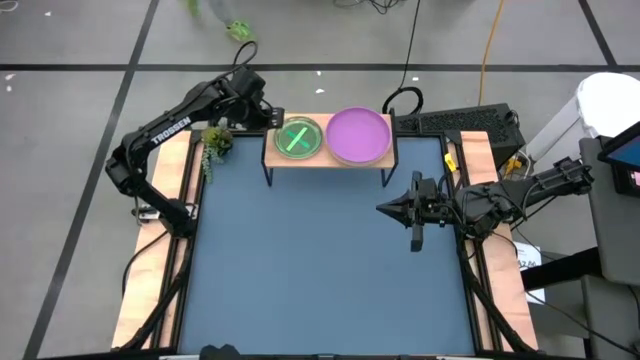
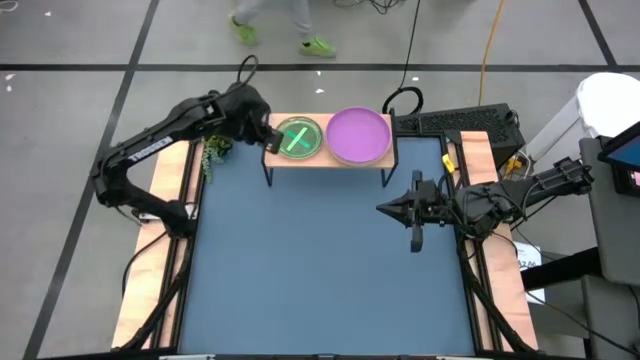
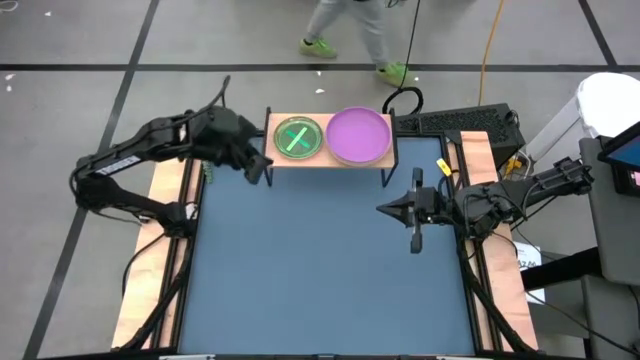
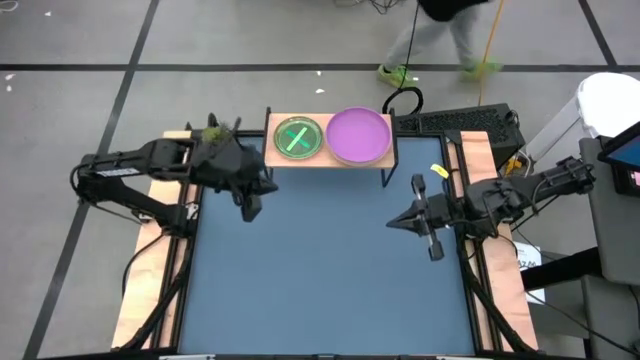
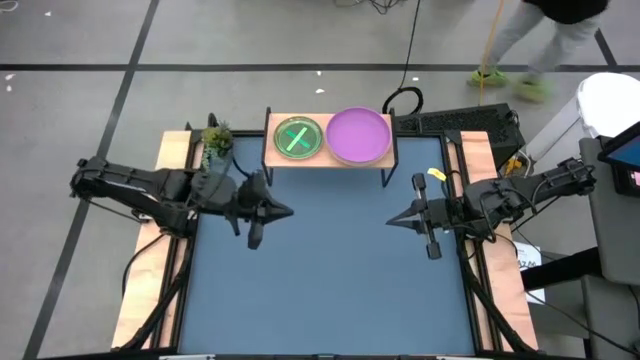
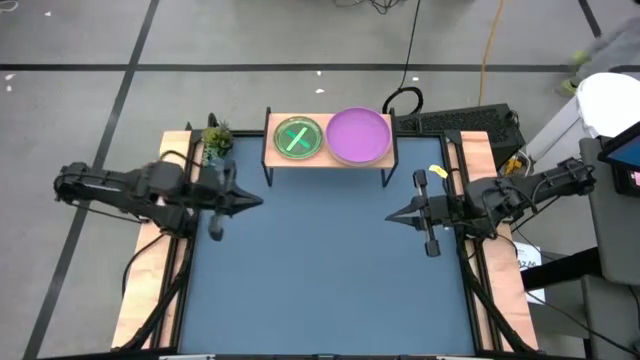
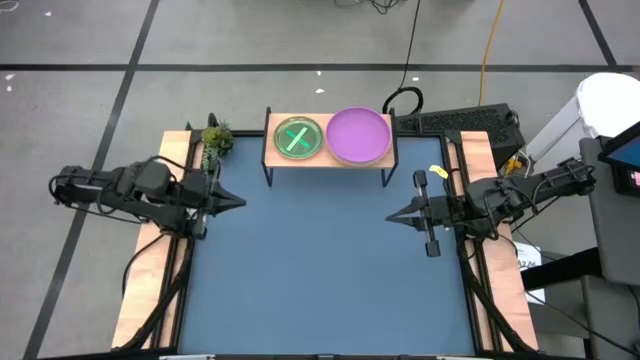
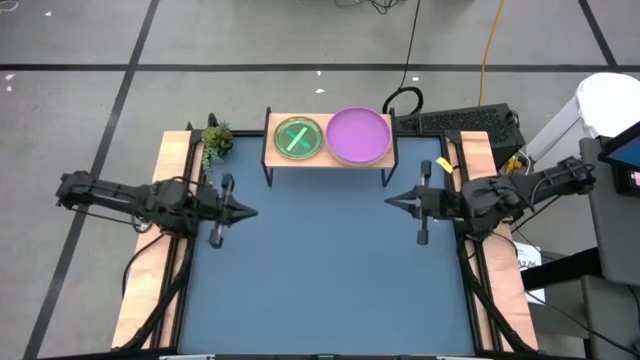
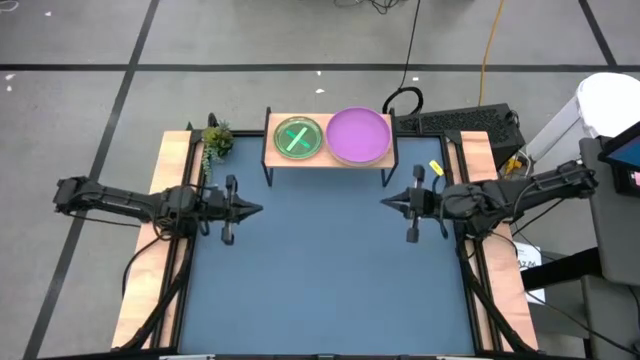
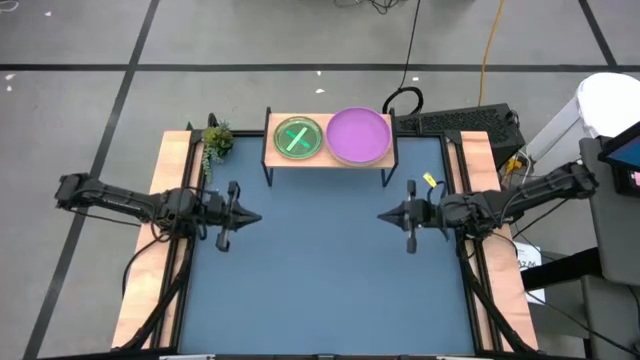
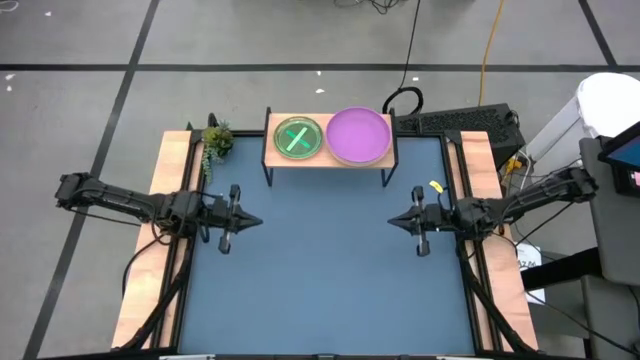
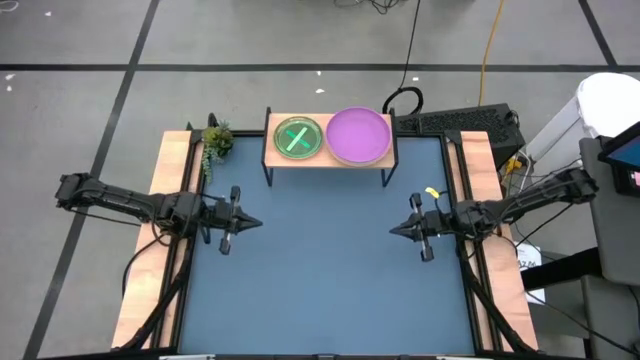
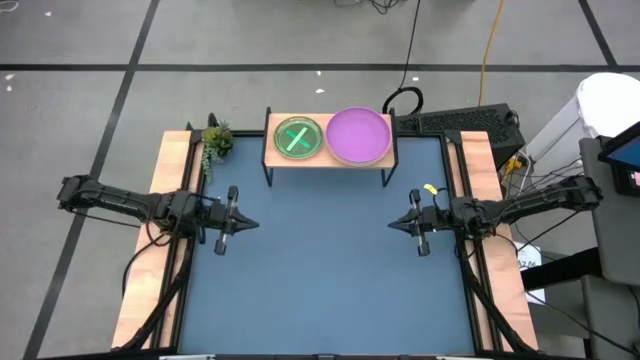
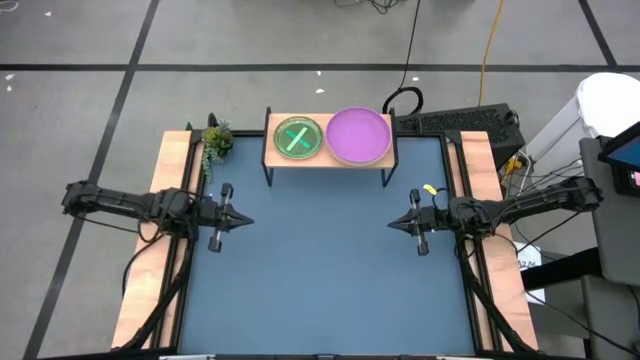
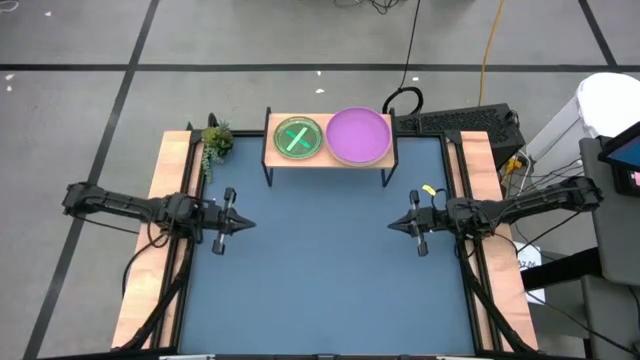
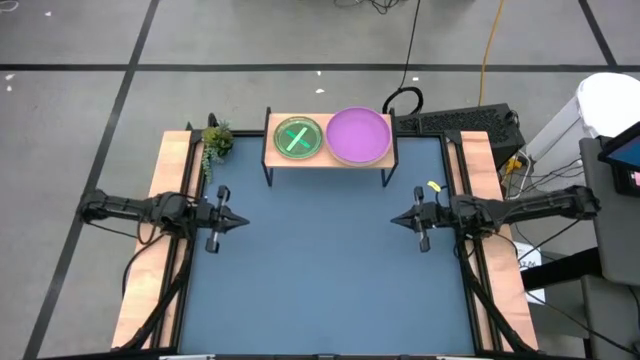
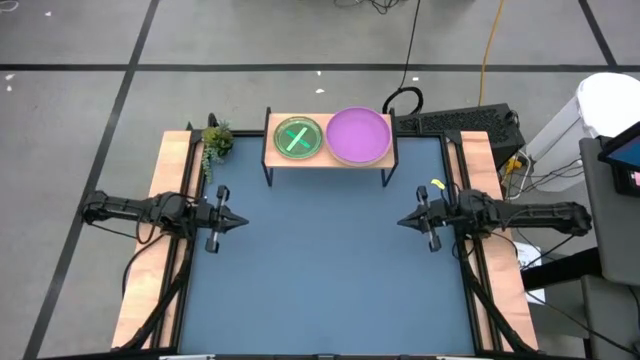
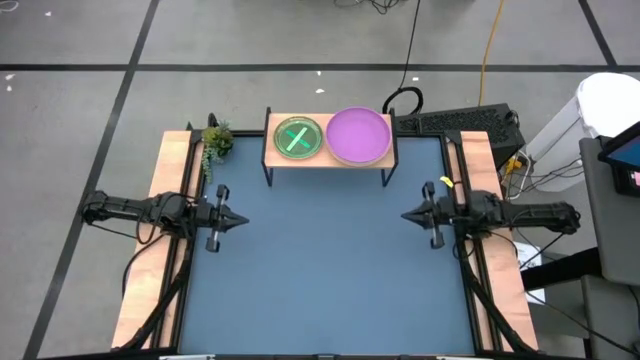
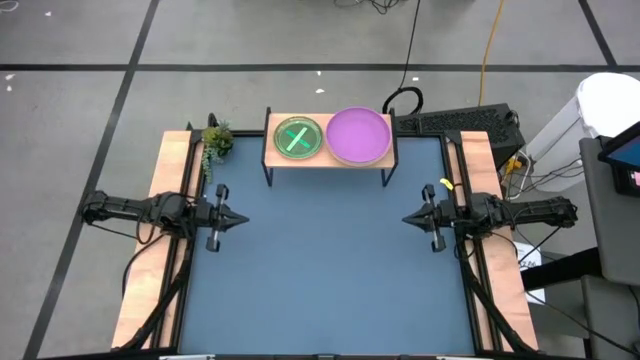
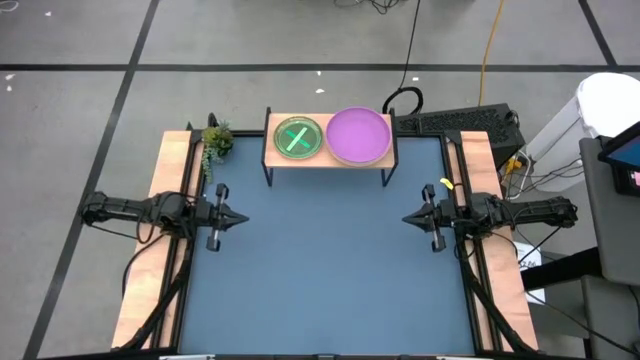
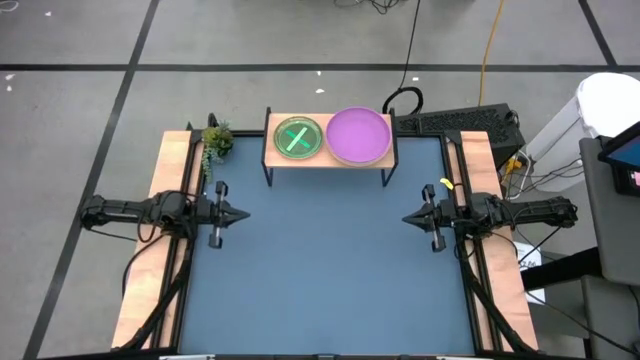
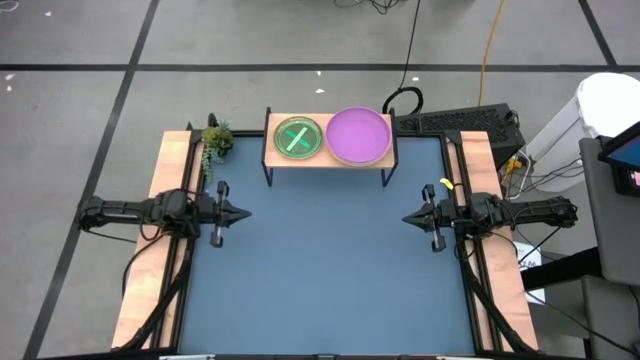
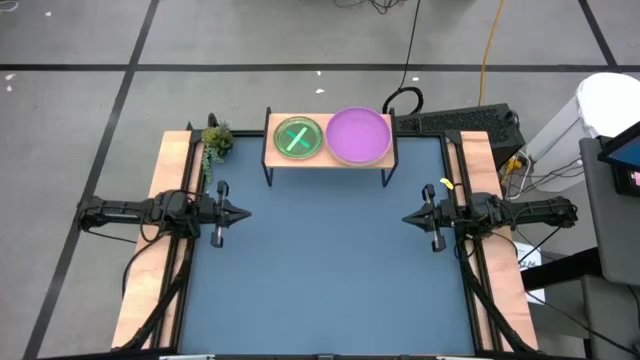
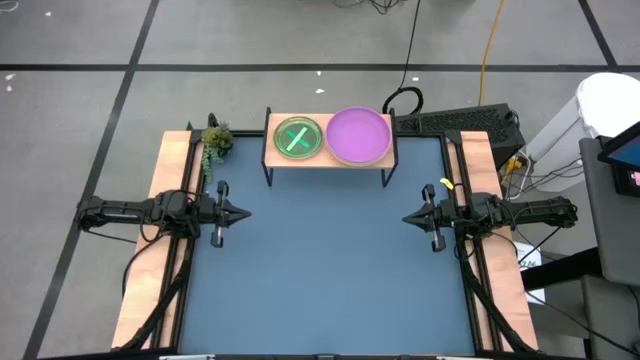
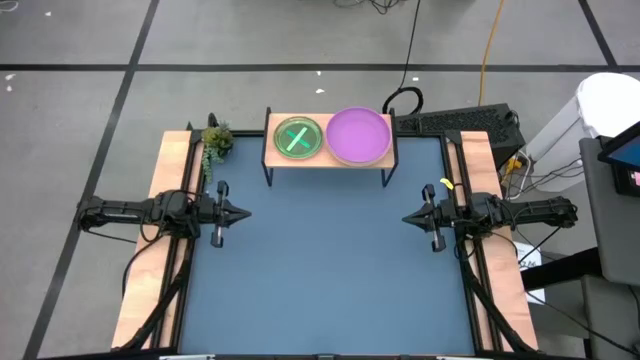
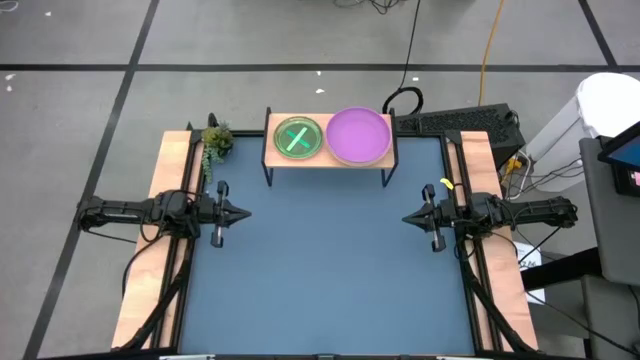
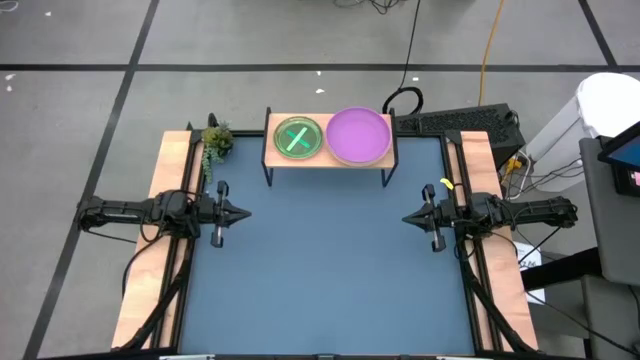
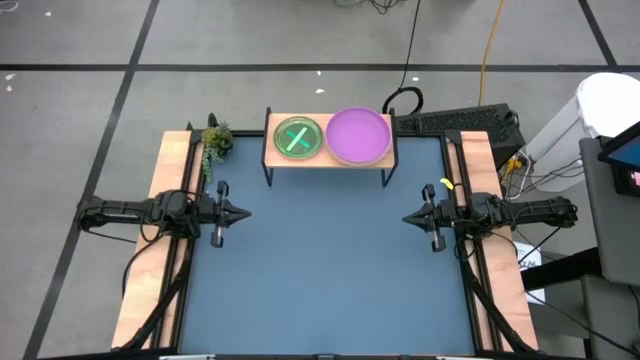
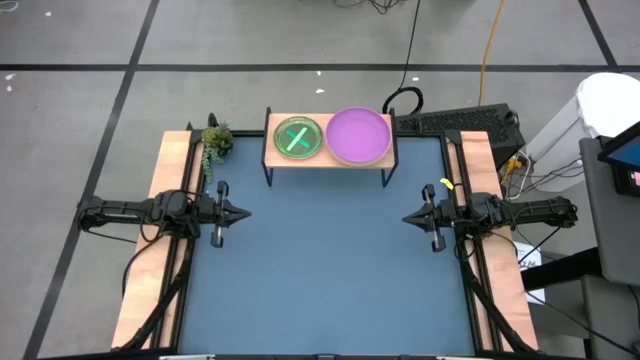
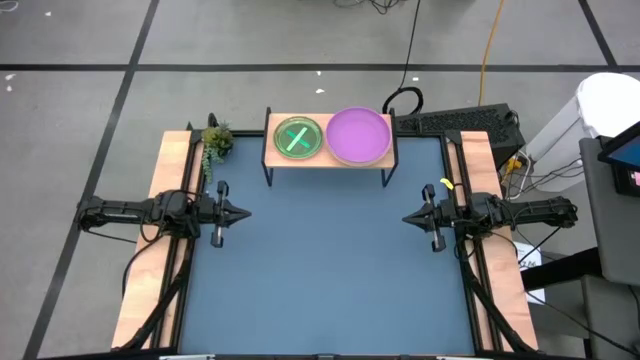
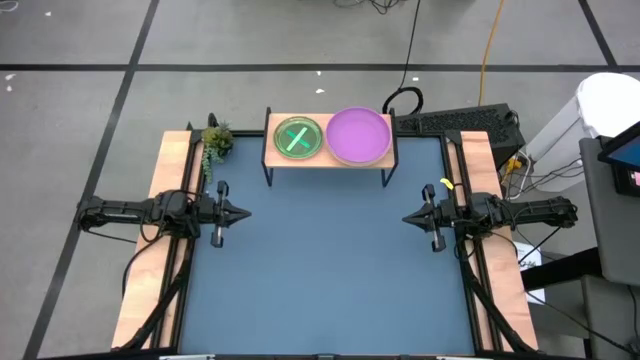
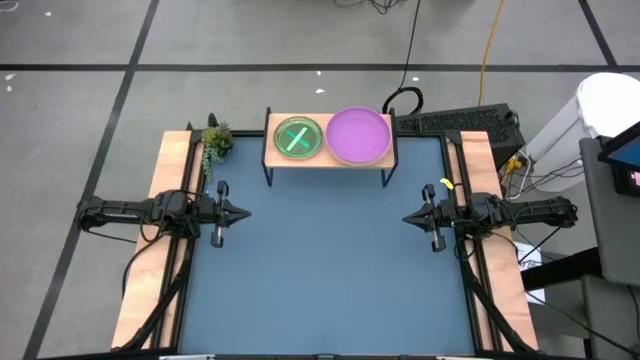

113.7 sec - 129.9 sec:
Task: Place and stack plates onto a shelf
Return to Home Position

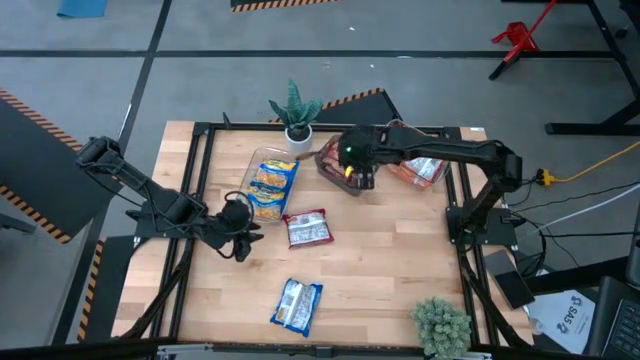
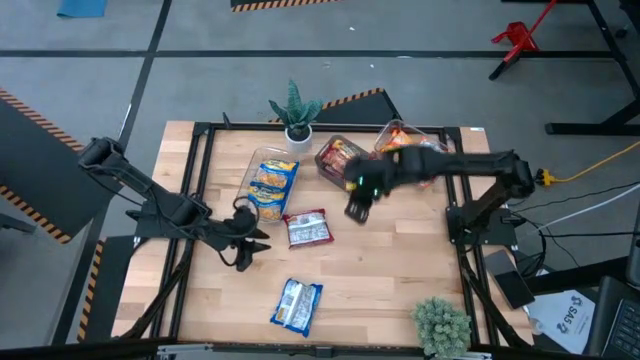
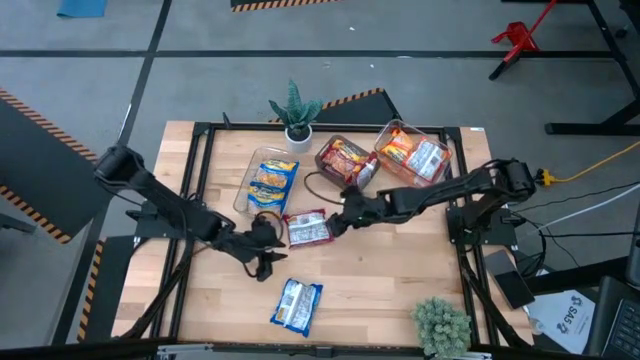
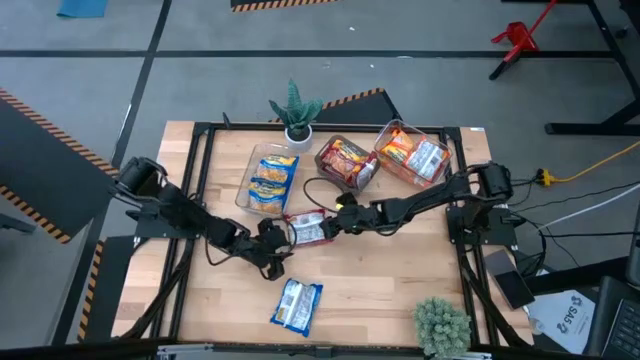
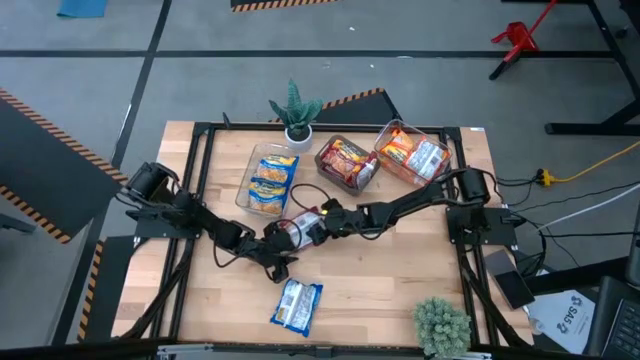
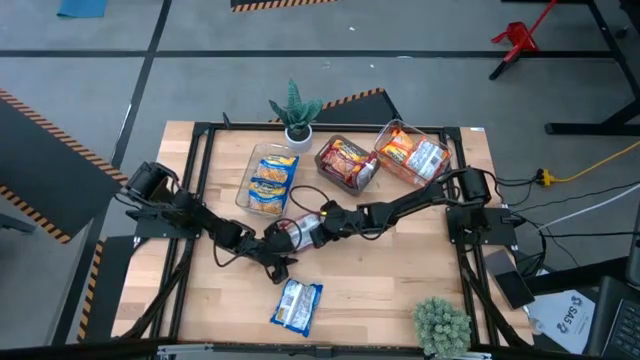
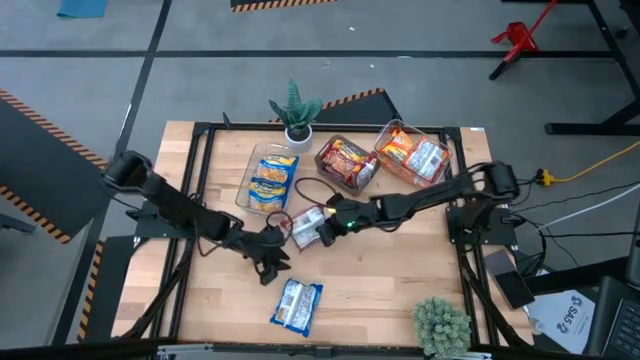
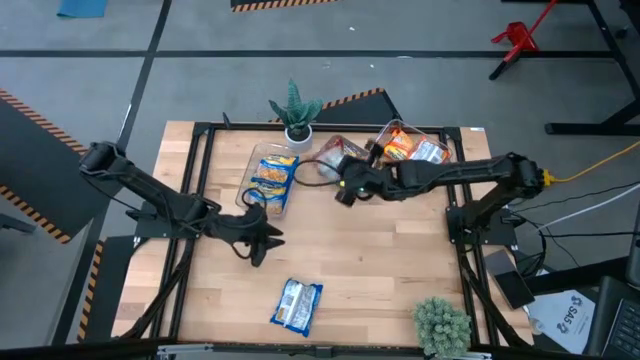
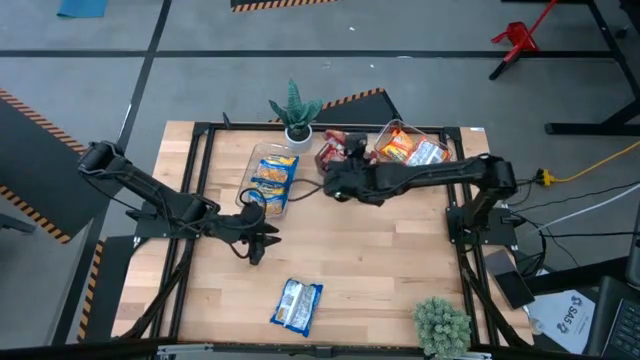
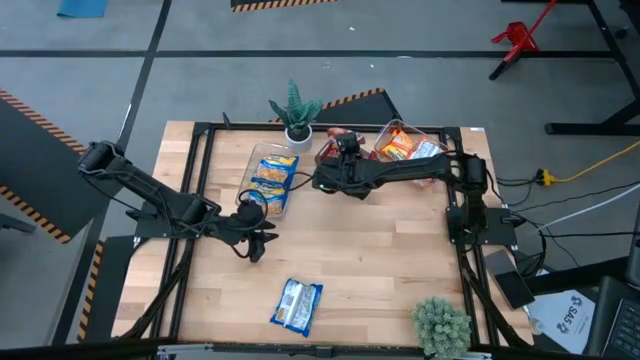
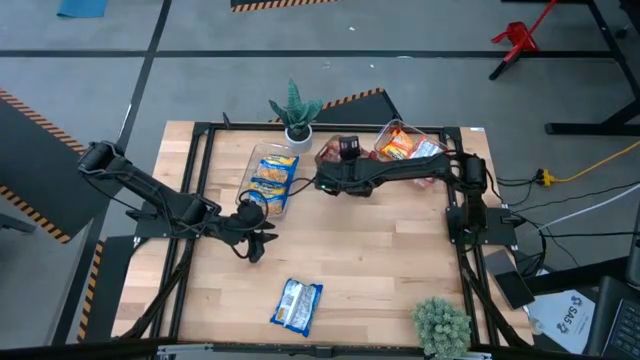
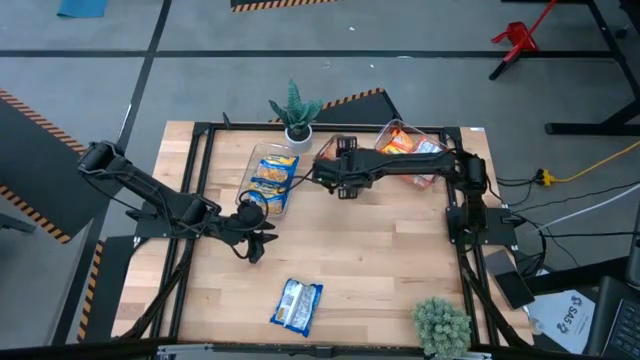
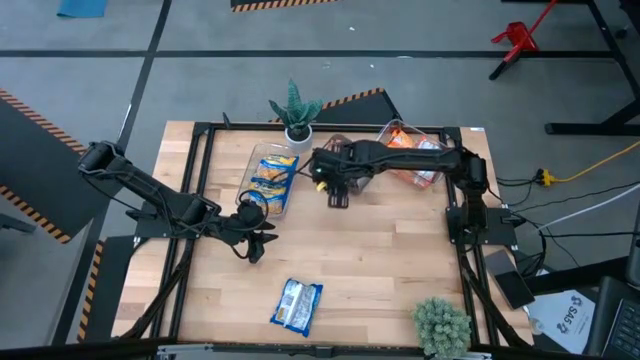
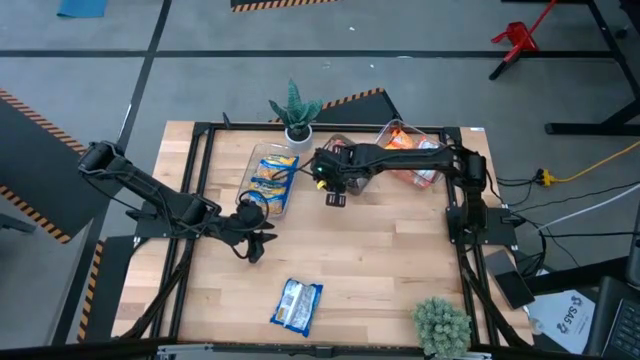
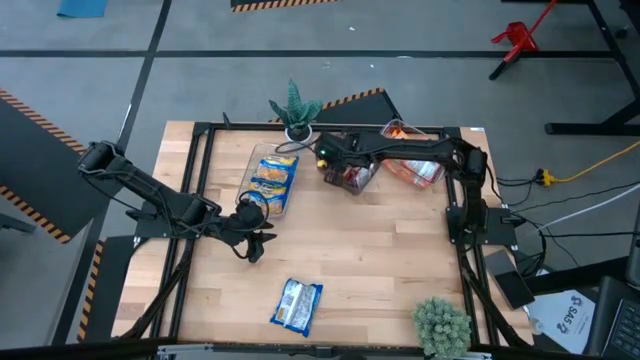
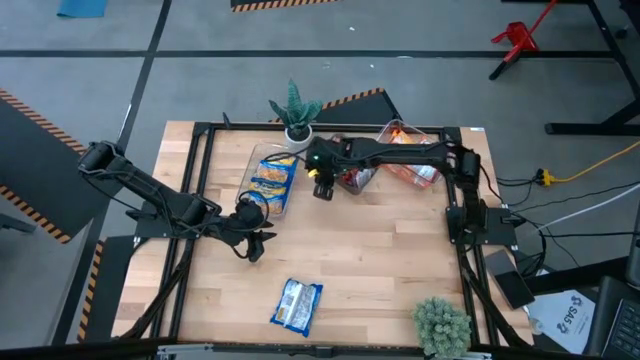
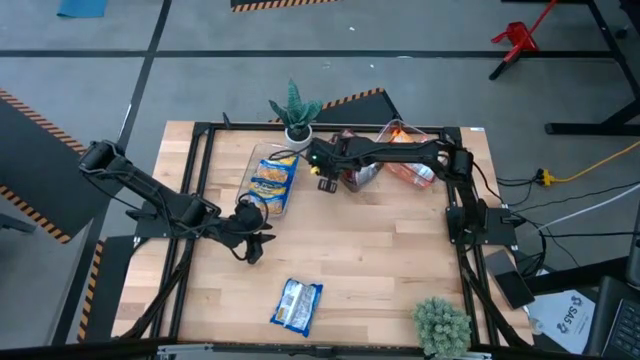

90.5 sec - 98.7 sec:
Task: Sort Maruchan noodles
Put the red noodle pack into the black bin
